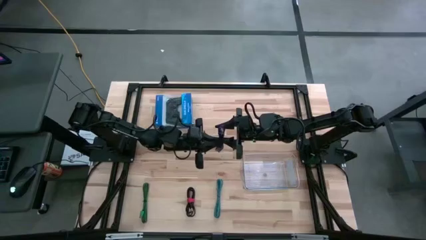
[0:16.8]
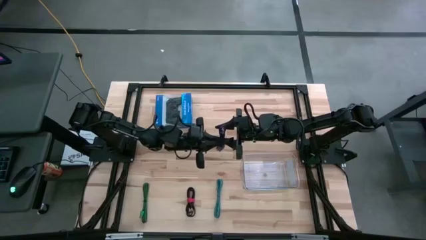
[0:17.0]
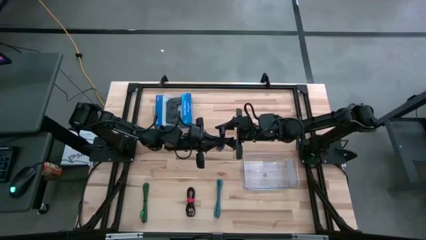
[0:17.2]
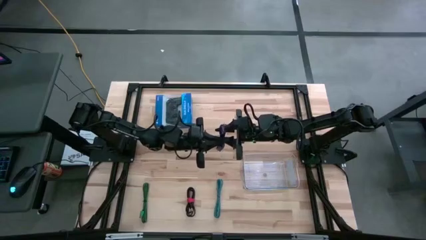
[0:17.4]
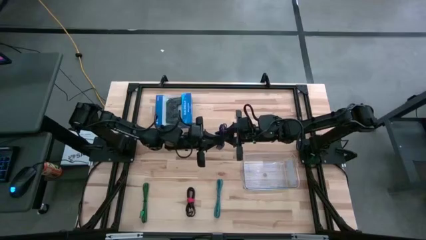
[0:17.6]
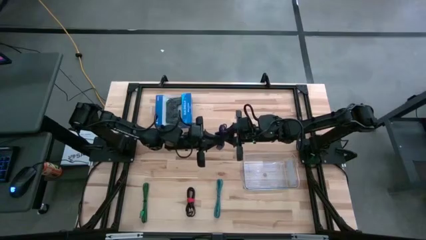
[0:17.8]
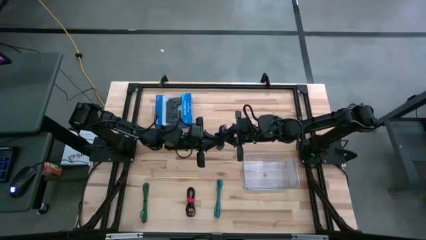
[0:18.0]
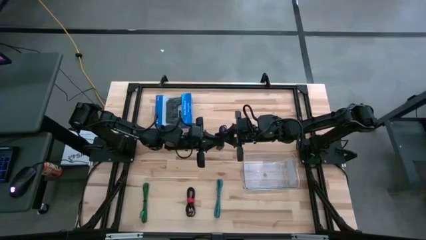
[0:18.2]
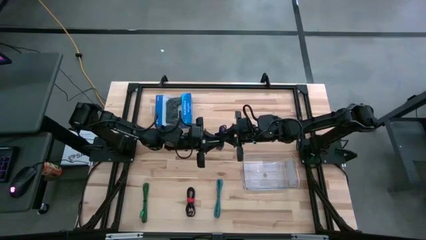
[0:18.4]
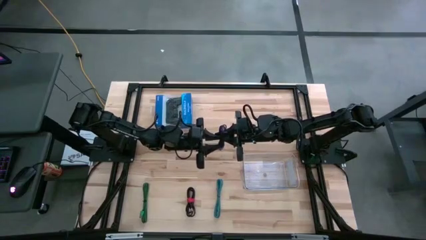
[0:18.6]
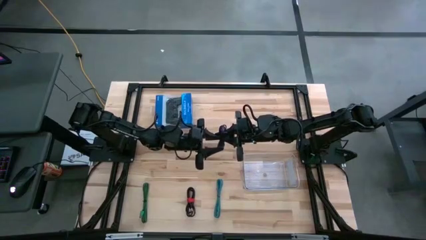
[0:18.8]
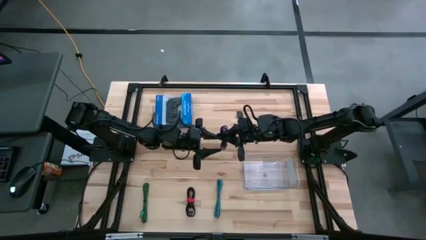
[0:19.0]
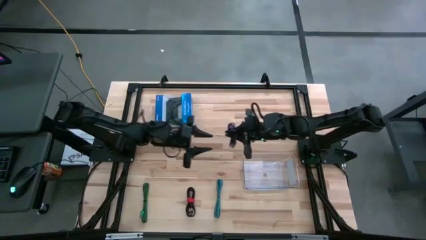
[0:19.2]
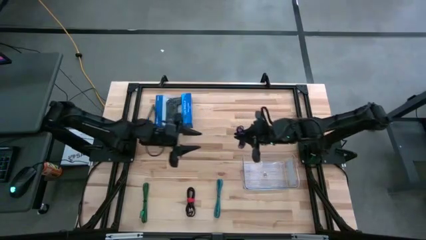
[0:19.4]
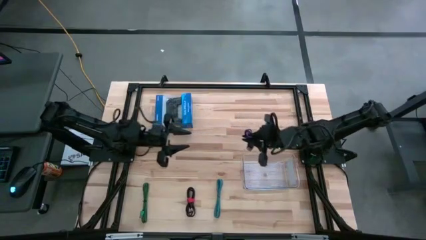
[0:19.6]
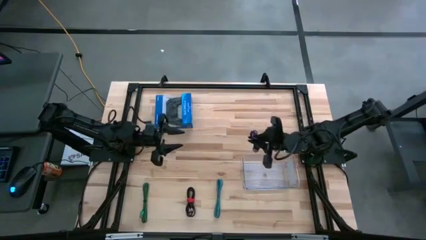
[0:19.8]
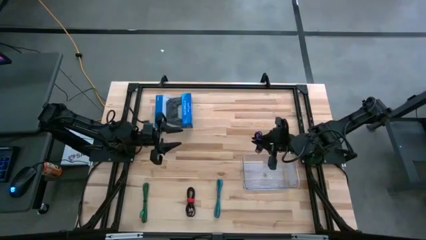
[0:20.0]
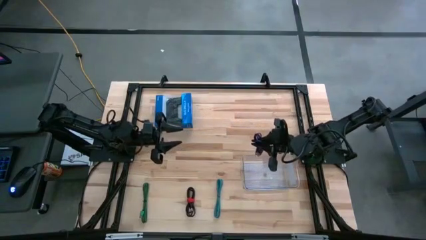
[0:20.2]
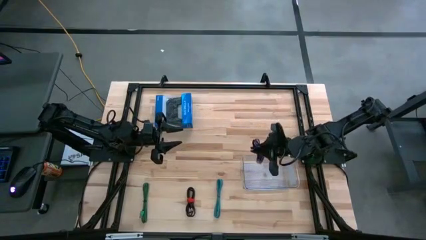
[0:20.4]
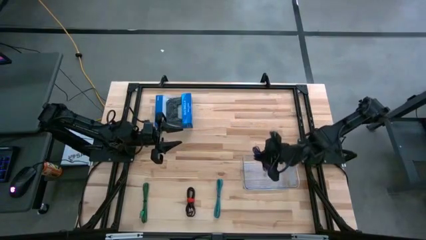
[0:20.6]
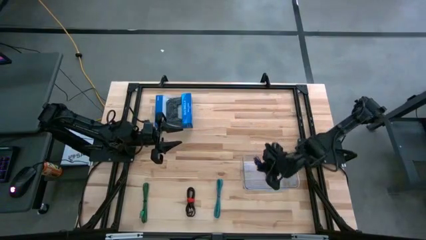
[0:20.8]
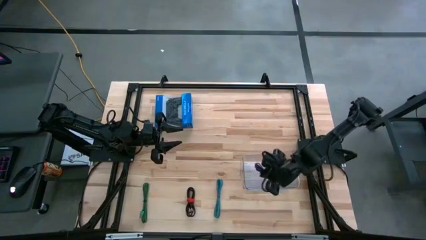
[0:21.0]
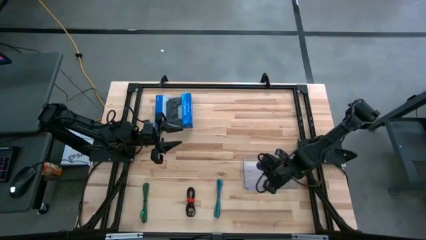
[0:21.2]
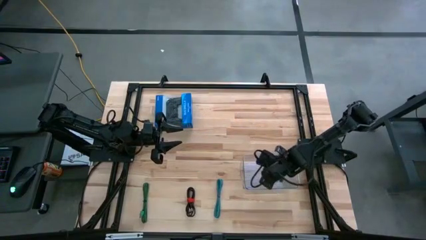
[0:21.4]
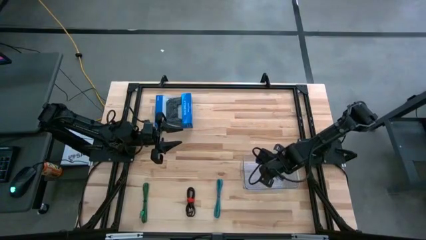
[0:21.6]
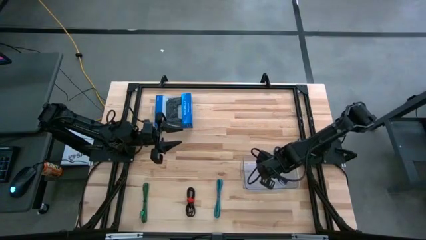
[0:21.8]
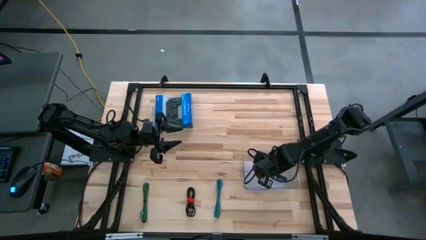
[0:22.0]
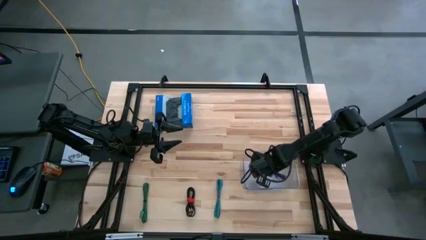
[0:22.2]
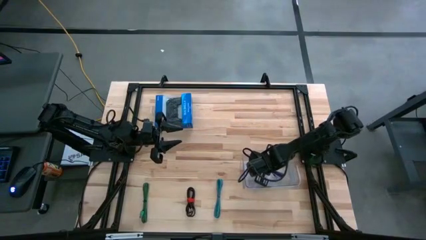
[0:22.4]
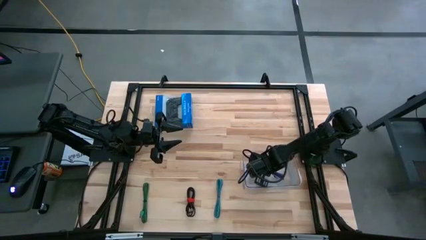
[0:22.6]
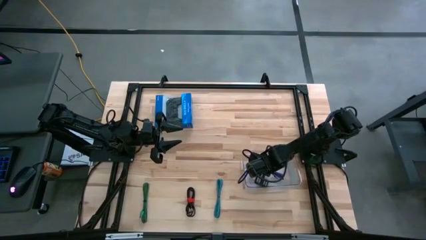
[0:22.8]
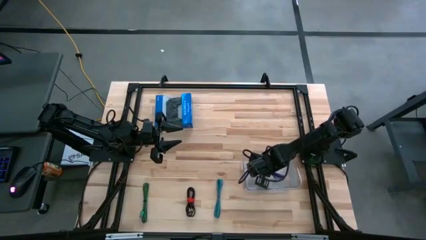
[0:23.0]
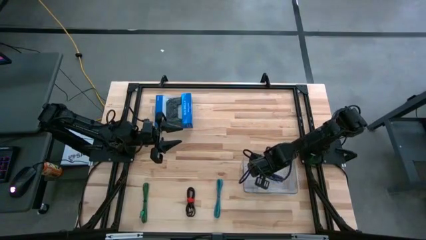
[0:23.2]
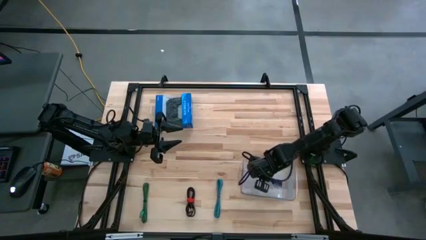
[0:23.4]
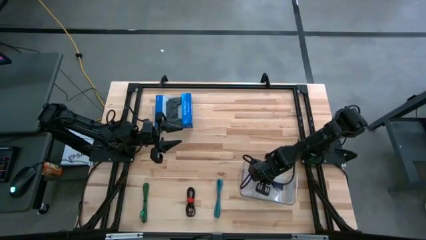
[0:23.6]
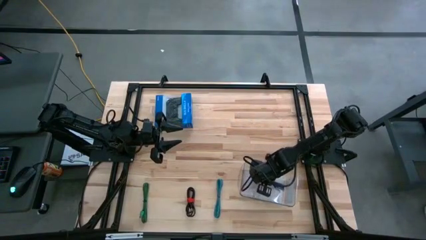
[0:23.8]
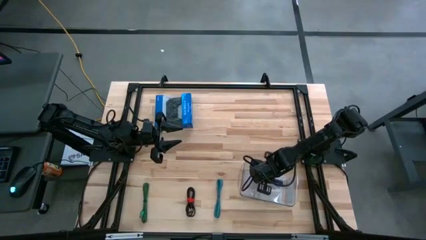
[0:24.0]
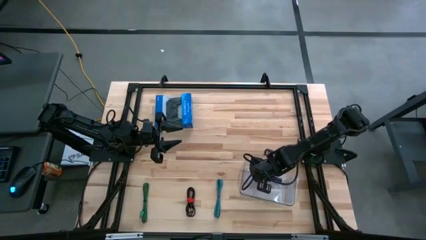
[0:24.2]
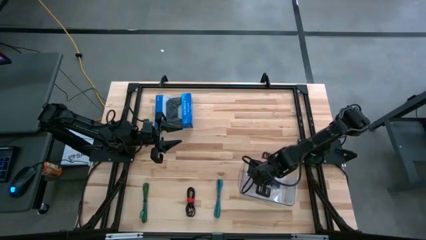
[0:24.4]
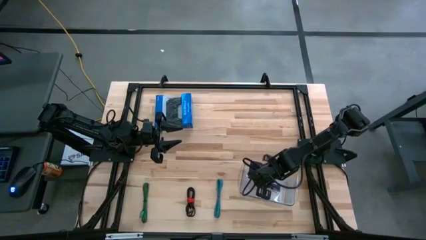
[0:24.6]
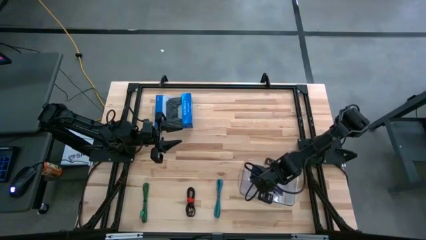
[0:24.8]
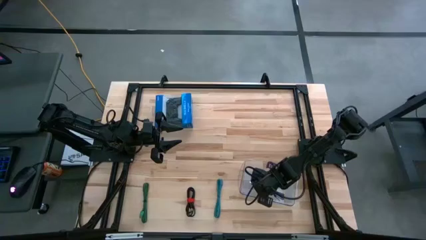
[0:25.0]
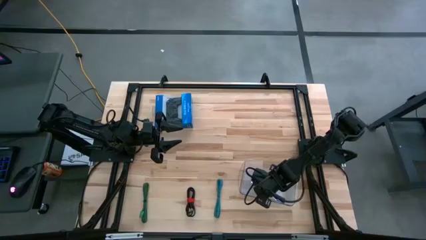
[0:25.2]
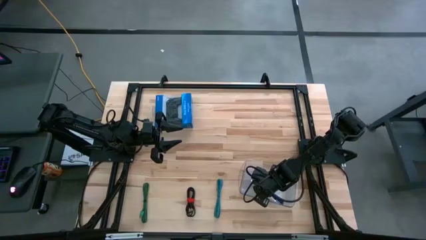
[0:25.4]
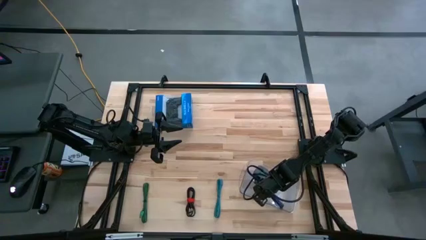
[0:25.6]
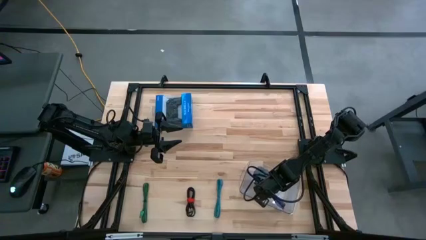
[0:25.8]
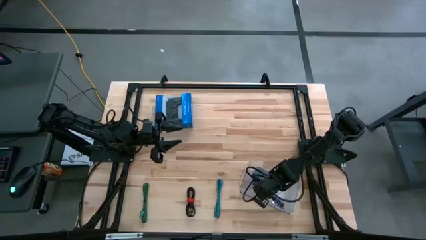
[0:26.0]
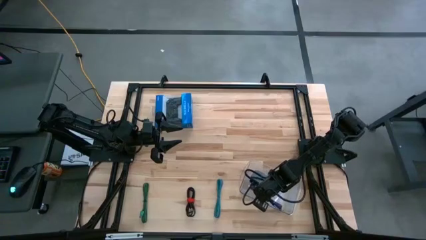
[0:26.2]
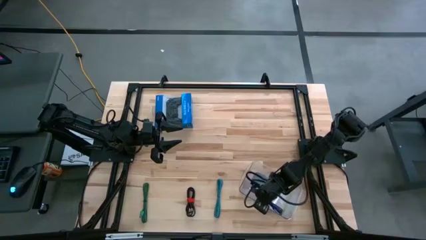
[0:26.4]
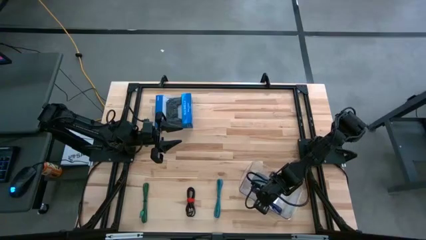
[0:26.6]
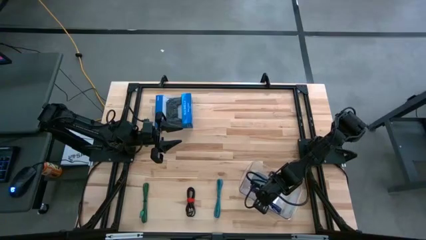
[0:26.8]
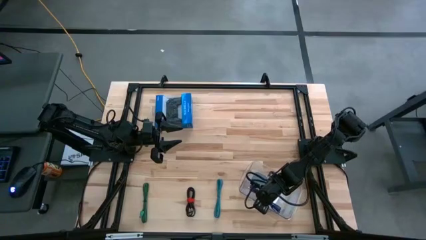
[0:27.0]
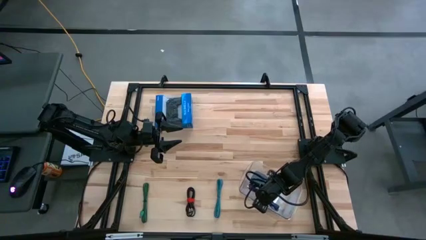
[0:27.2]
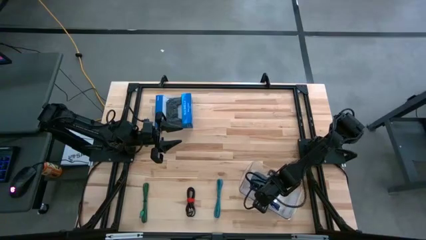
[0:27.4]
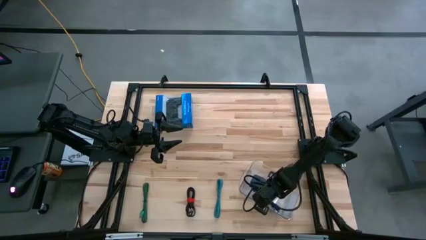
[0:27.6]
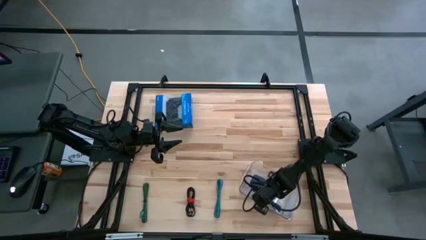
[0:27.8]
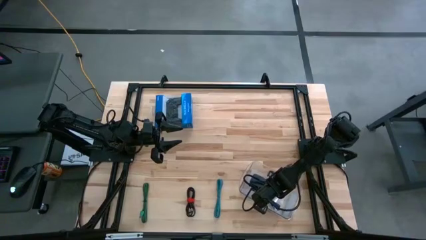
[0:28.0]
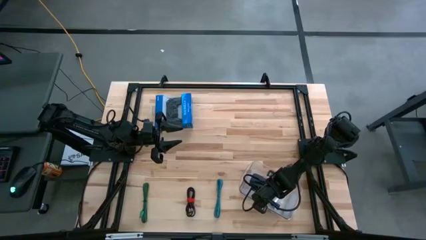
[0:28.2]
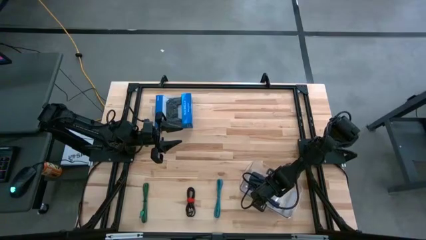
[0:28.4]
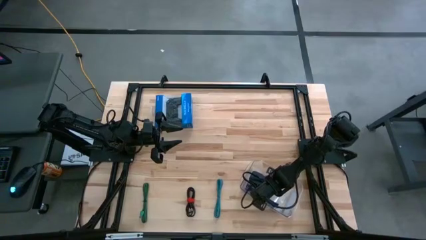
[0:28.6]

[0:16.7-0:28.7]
Task: Pick and place USB-C Cables
Put the purple charger cable into the transparent bin
